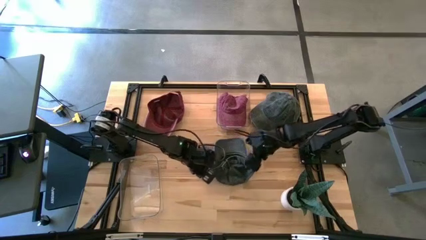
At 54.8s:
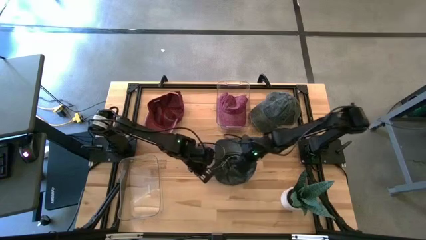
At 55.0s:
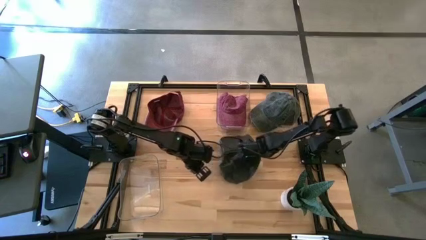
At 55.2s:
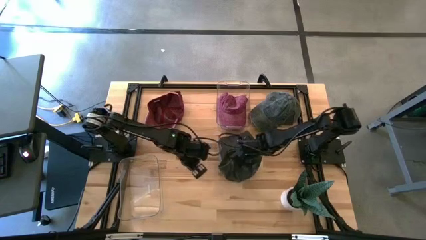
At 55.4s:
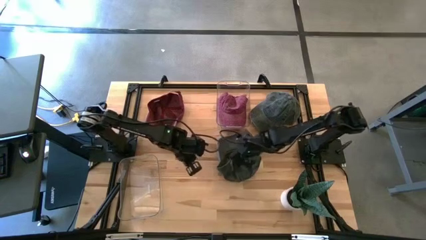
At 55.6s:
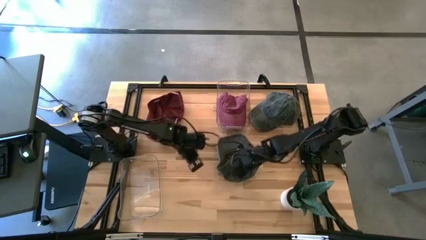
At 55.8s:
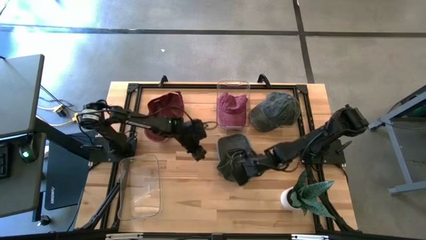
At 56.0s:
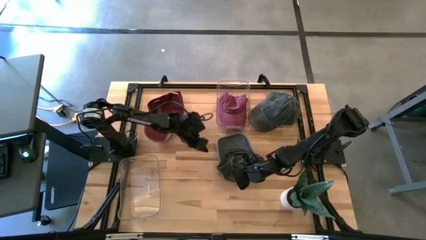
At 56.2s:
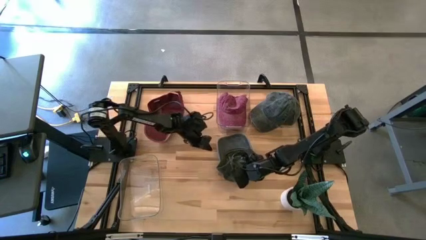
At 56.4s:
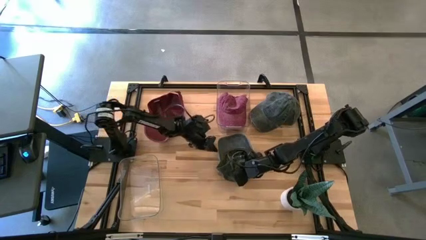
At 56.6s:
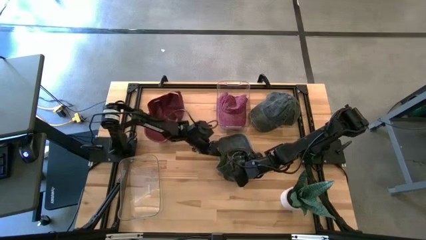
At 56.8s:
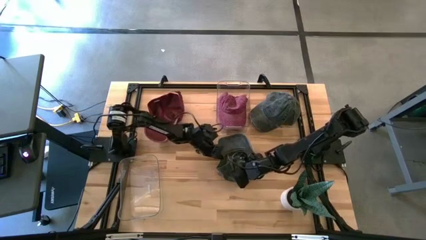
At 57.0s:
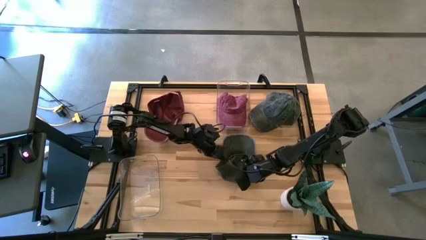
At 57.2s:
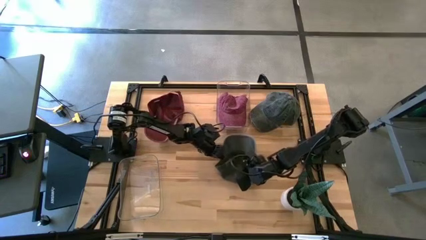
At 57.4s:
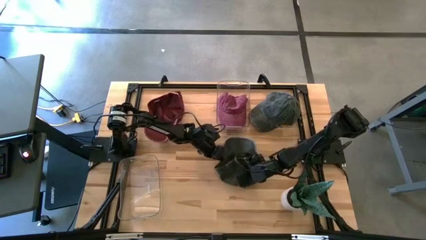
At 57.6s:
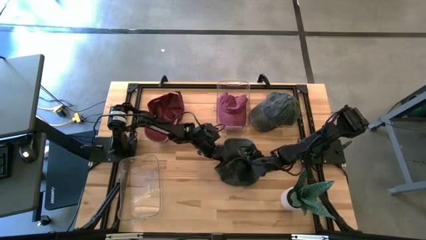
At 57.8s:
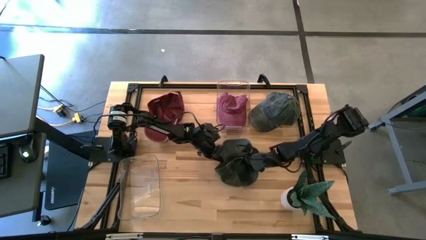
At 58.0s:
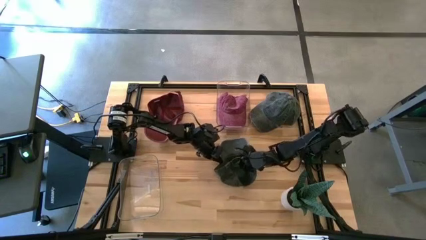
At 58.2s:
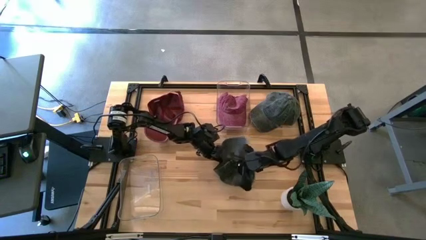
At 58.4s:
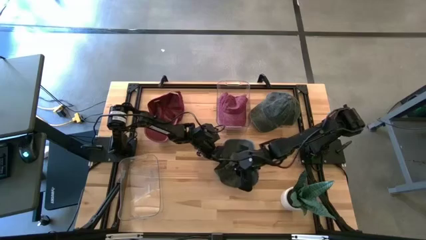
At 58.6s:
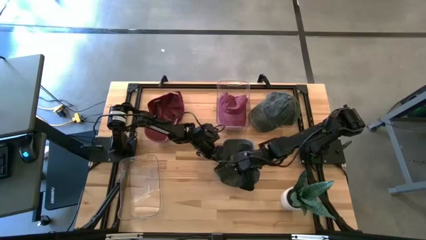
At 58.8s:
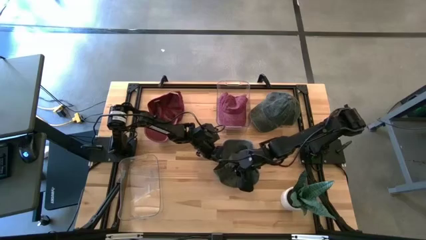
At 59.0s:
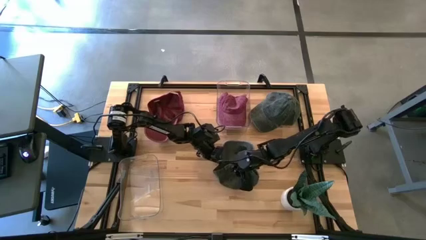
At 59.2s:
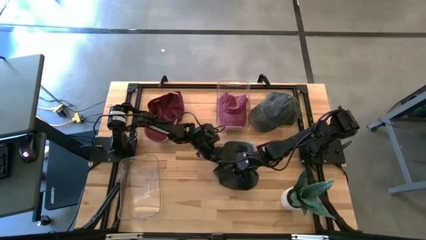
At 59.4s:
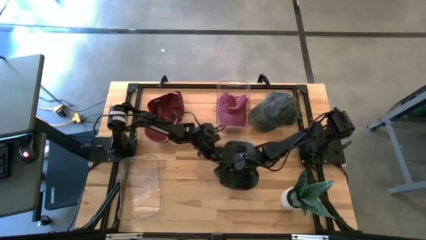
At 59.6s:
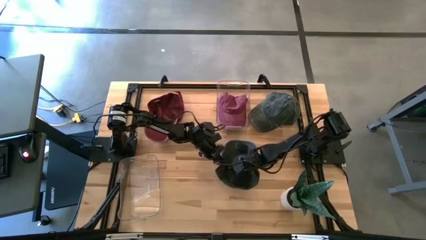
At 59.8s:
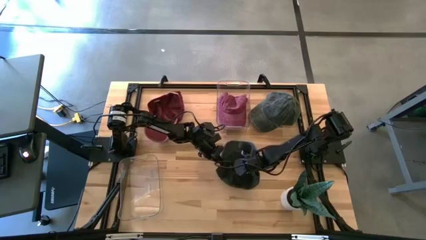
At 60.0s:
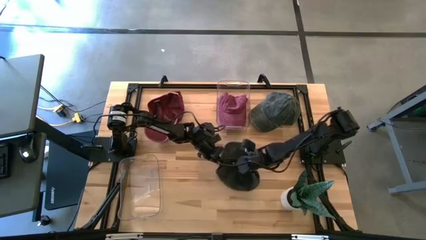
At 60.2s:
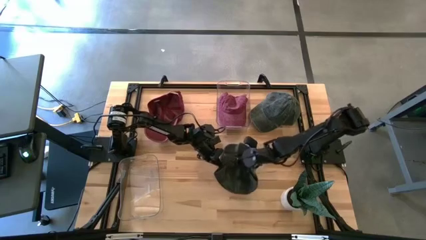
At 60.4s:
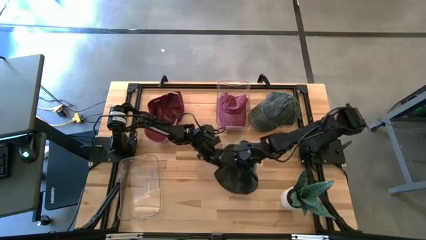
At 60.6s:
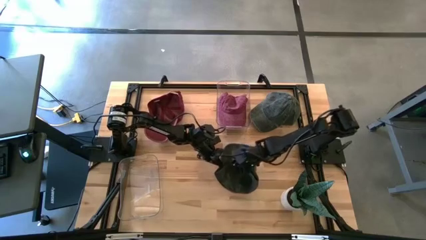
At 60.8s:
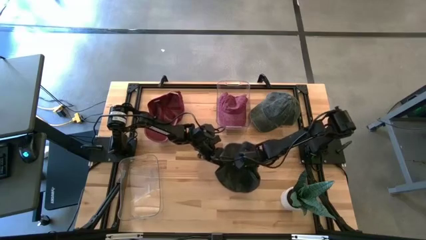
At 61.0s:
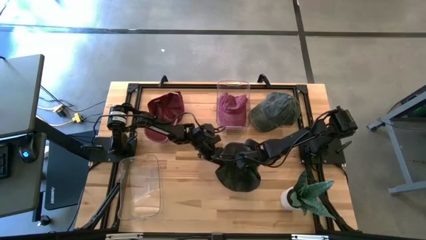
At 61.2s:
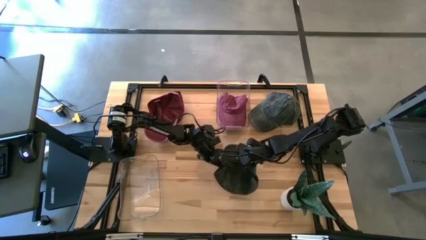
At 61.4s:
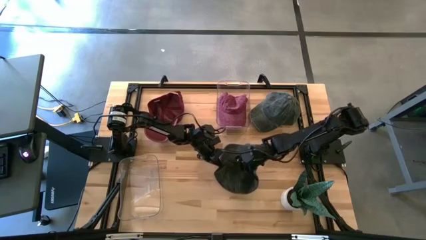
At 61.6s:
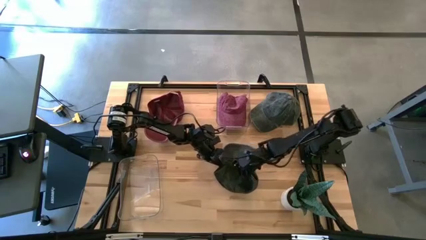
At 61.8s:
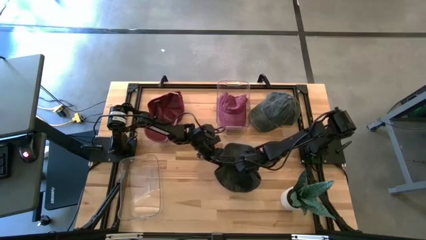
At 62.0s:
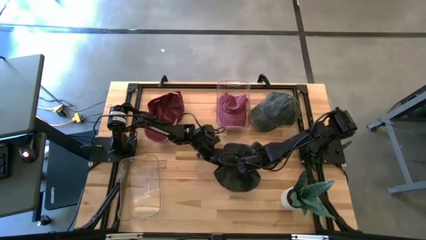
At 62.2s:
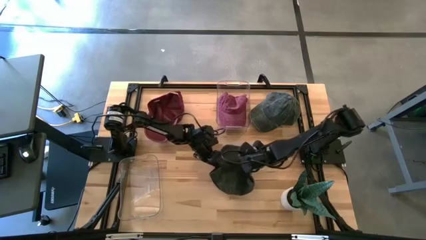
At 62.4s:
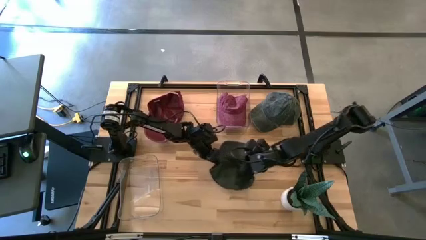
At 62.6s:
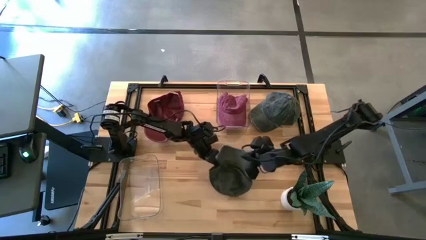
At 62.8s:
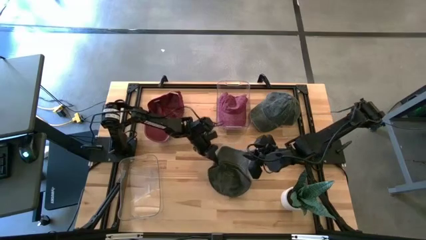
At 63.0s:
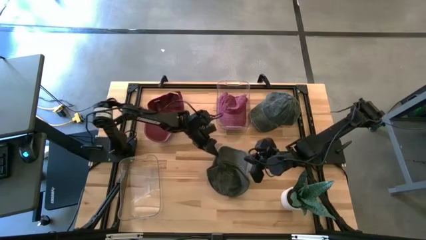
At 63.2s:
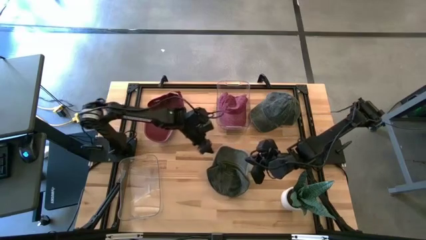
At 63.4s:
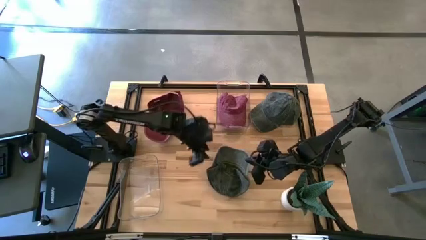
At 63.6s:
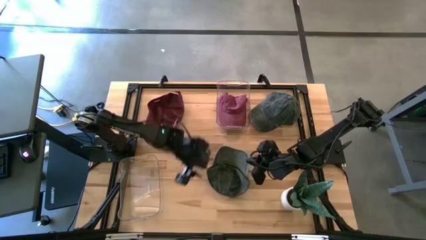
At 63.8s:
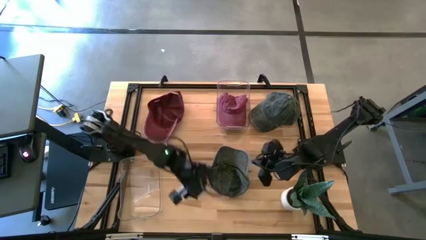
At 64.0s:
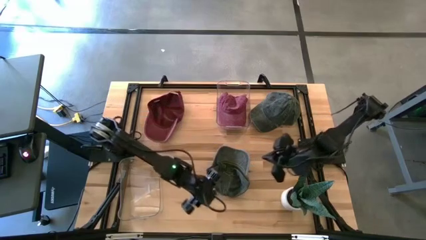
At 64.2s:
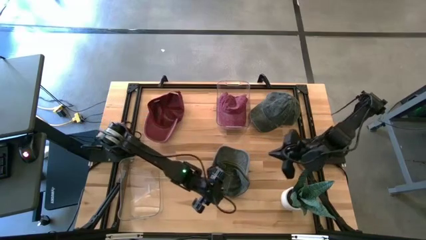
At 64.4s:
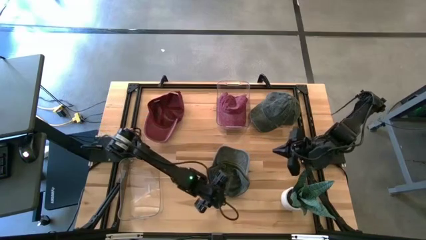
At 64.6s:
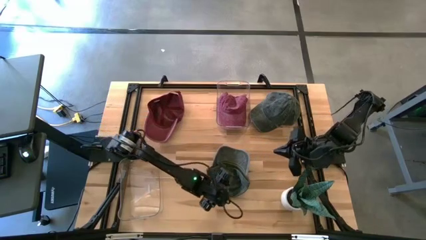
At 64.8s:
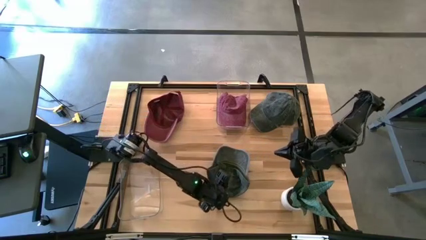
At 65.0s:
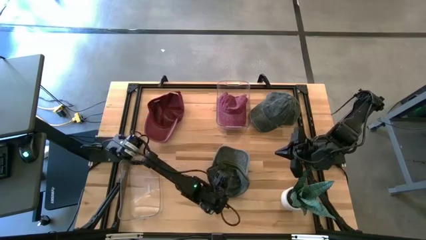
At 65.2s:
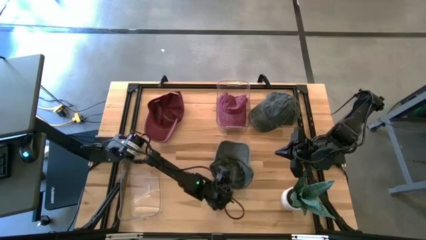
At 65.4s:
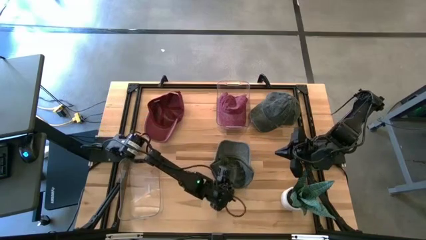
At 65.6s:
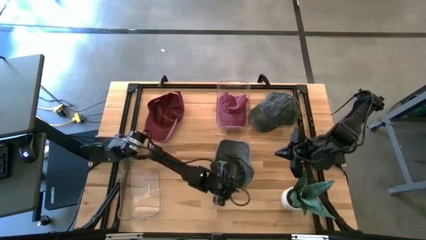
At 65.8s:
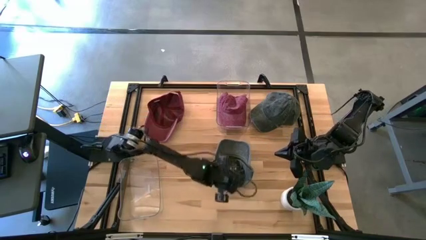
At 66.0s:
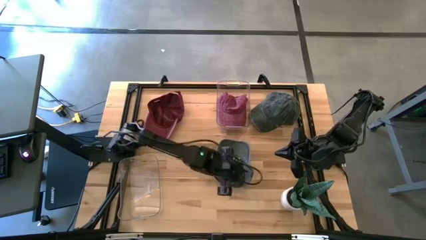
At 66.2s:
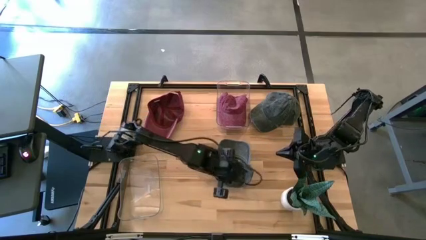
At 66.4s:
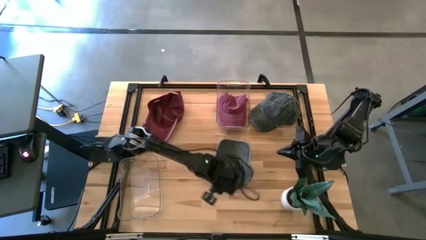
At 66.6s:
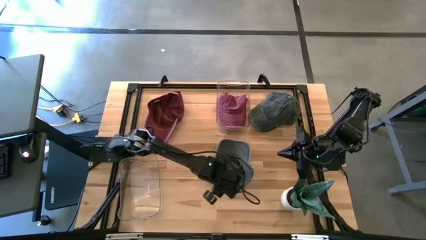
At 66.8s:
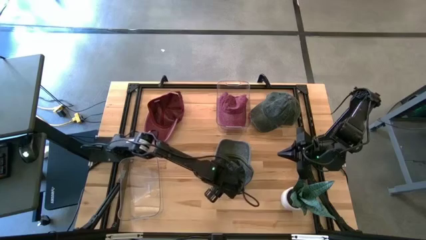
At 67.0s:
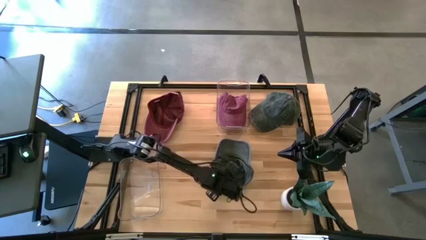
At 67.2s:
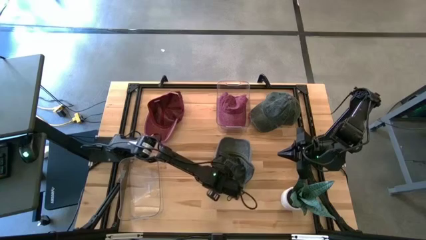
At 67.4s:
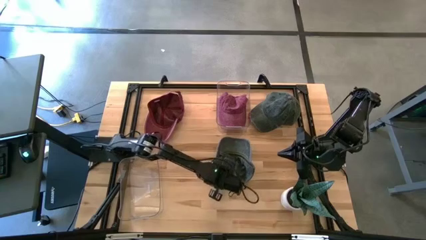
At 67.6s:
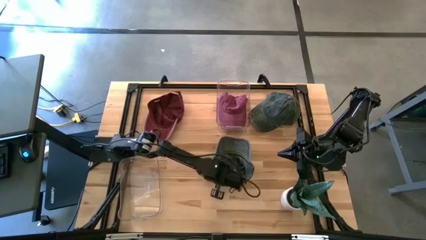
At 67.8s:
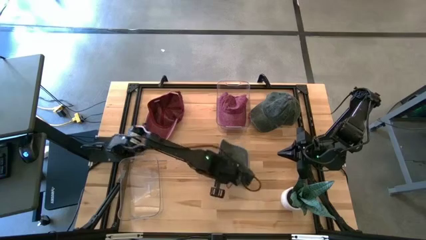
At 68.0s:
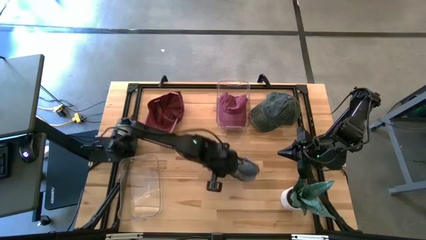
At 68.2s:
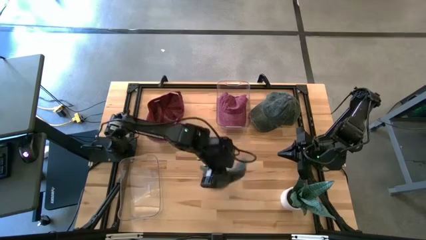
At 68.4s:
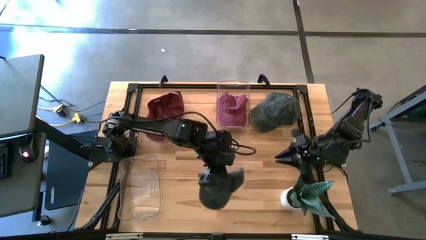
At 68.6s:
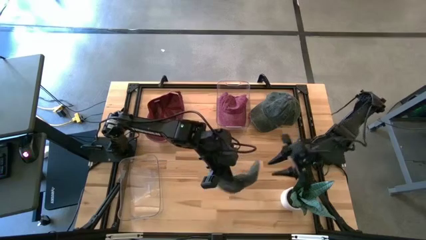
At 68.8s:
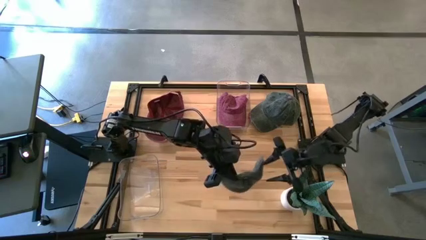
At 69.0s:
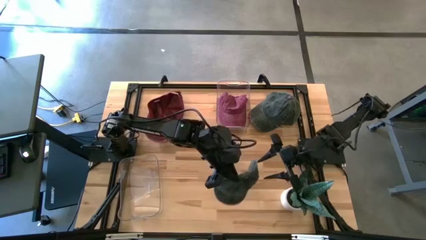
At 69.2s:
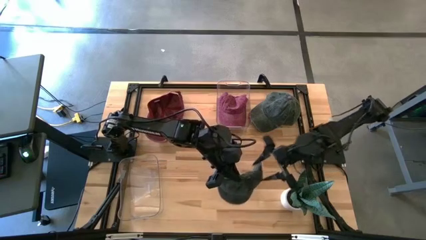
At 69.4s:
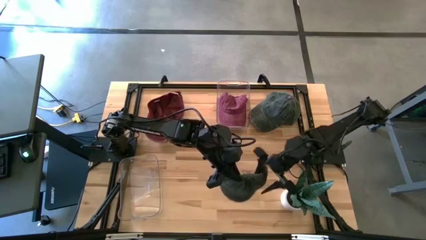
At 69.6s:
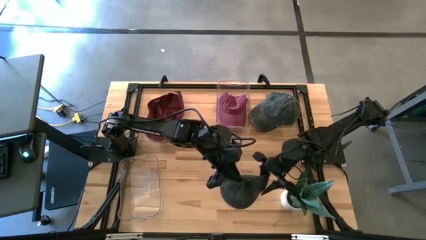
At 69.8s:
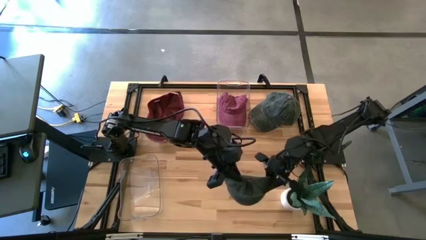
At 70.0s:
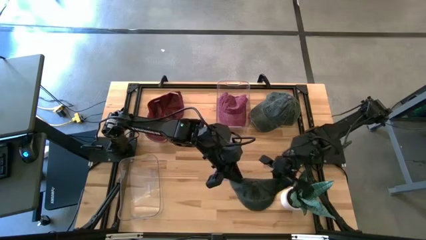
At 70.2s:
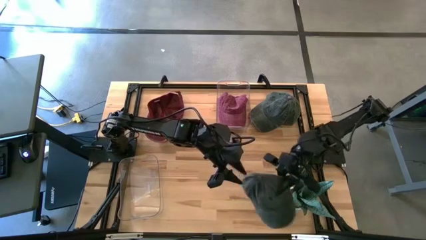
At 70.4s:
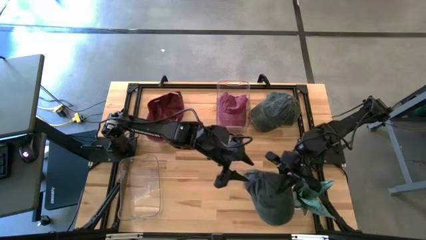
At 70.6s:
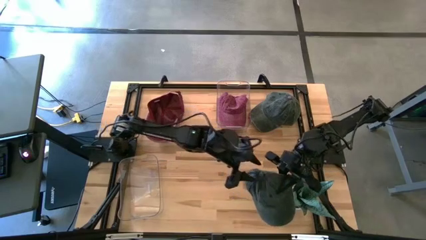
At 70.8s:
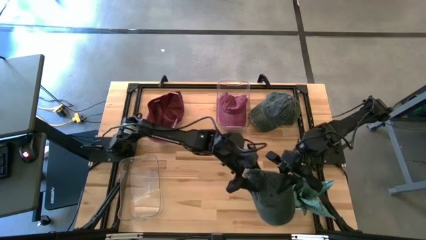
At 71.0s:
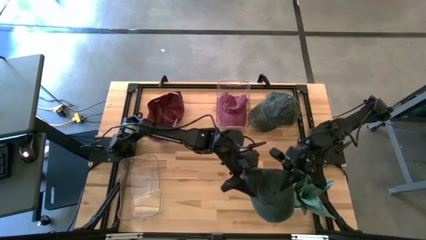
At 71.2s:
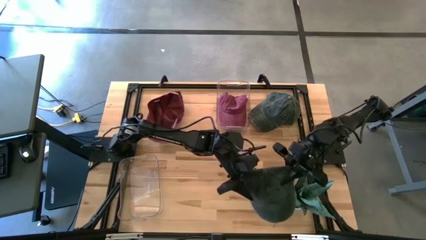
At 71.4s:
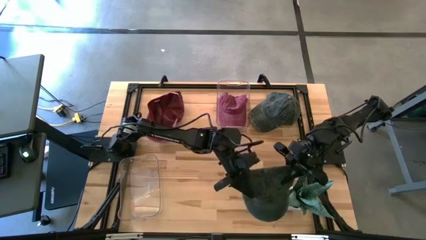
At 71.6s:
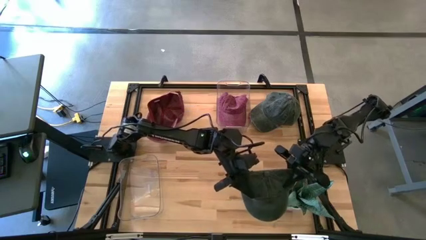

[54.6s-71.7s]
Task: Pick & Place hat
Put the left black cap into the bottom transparent bin
